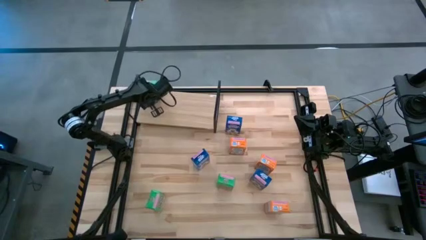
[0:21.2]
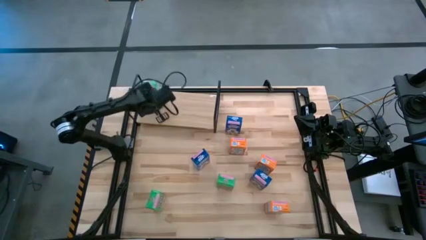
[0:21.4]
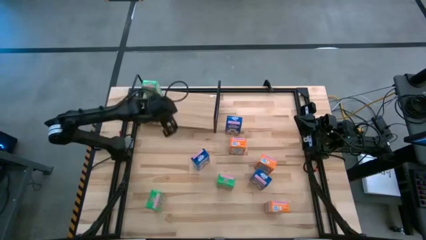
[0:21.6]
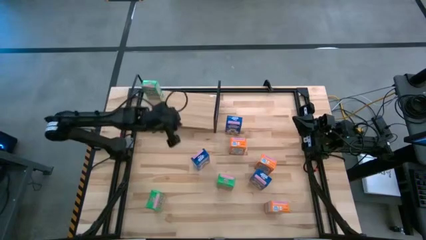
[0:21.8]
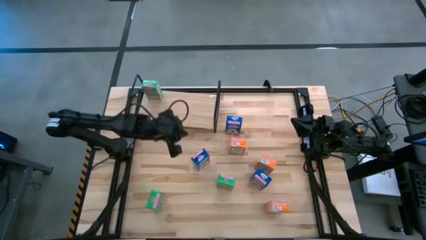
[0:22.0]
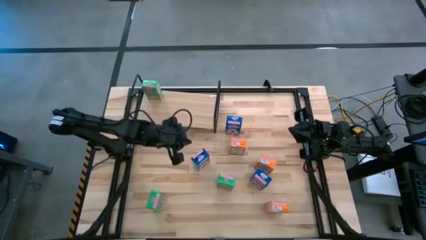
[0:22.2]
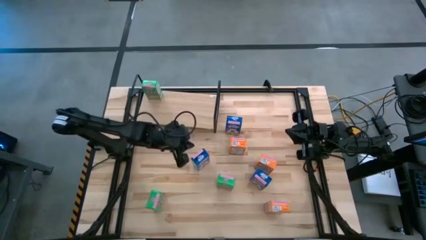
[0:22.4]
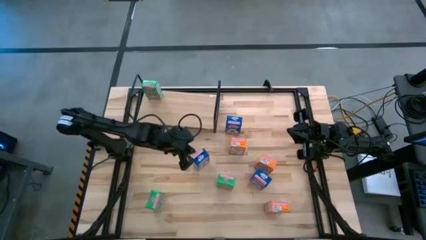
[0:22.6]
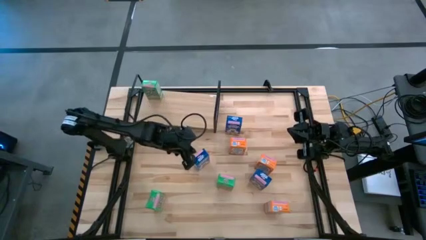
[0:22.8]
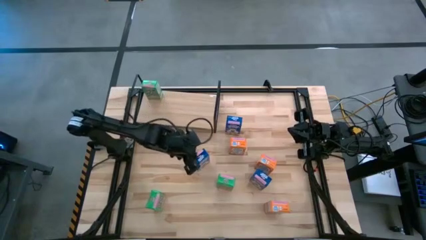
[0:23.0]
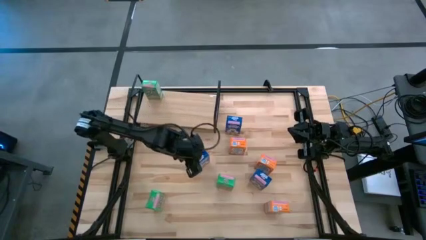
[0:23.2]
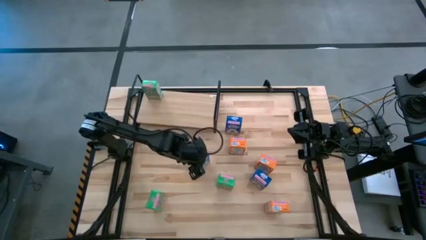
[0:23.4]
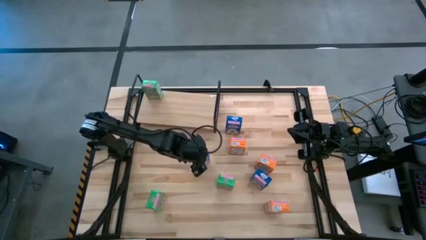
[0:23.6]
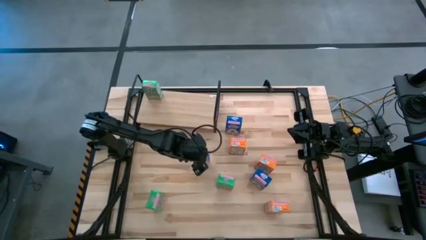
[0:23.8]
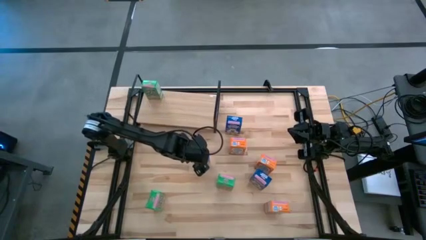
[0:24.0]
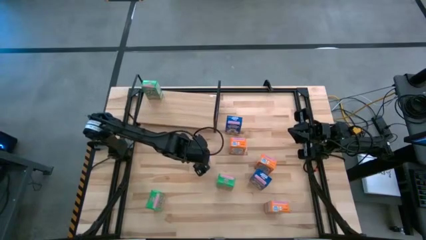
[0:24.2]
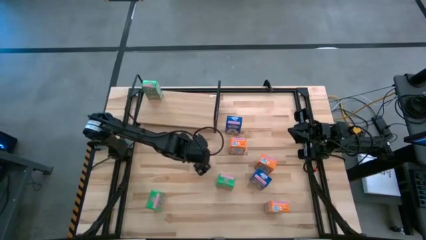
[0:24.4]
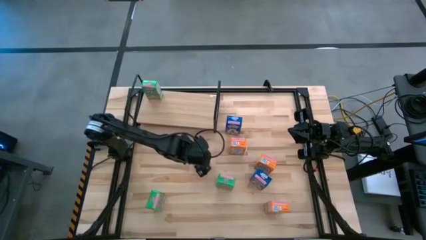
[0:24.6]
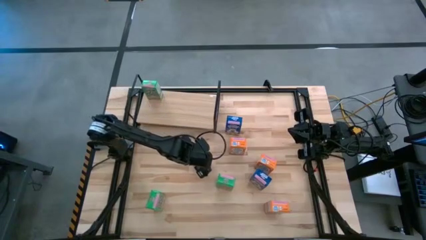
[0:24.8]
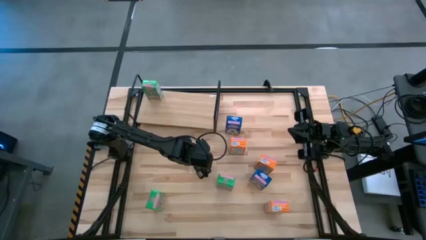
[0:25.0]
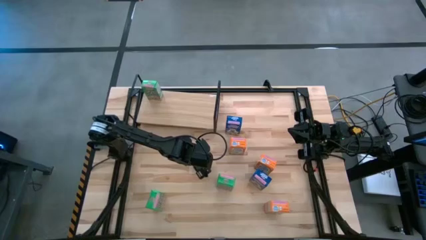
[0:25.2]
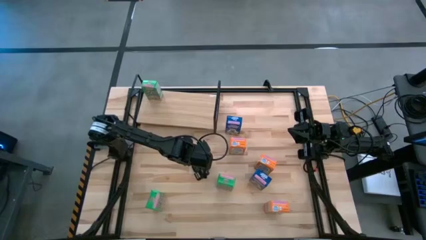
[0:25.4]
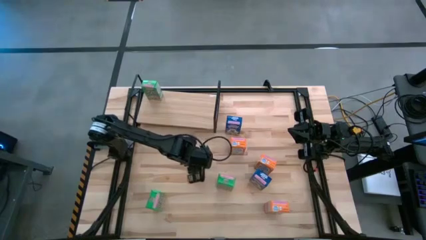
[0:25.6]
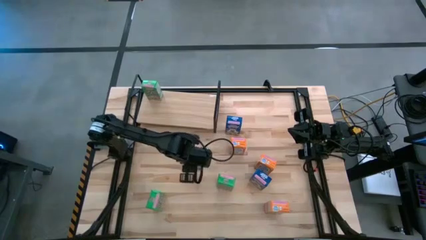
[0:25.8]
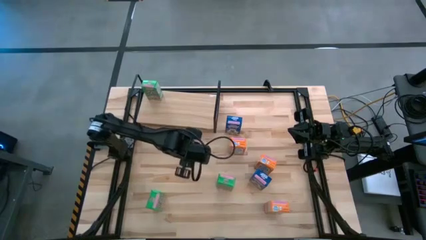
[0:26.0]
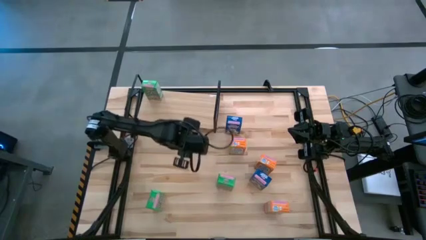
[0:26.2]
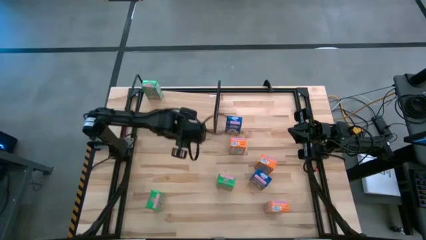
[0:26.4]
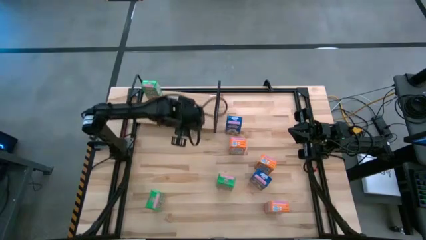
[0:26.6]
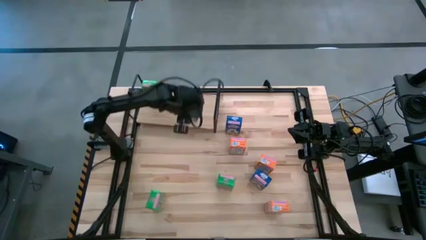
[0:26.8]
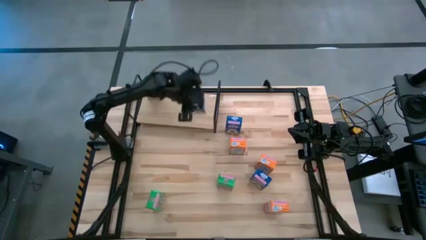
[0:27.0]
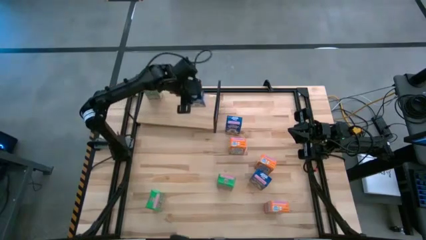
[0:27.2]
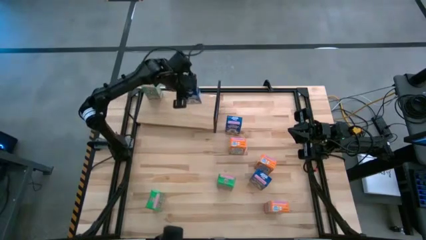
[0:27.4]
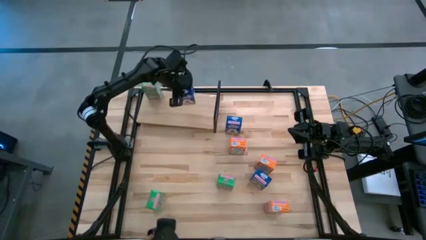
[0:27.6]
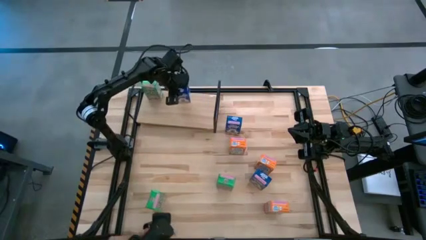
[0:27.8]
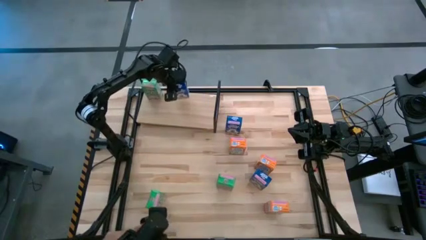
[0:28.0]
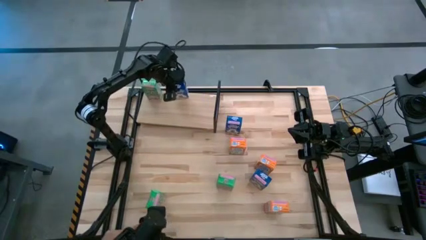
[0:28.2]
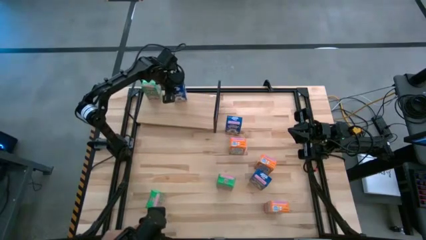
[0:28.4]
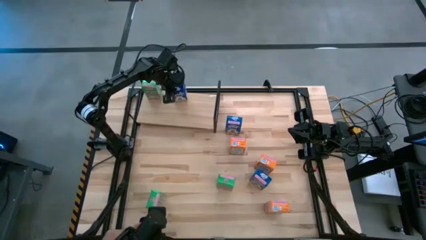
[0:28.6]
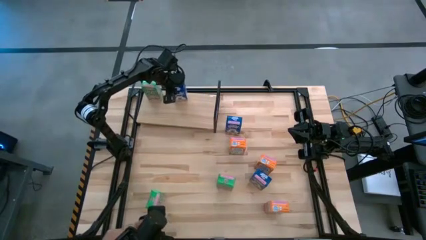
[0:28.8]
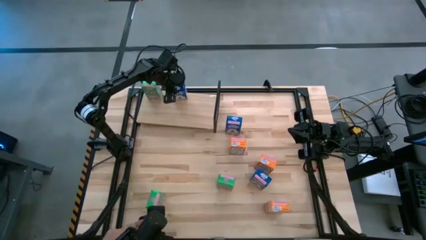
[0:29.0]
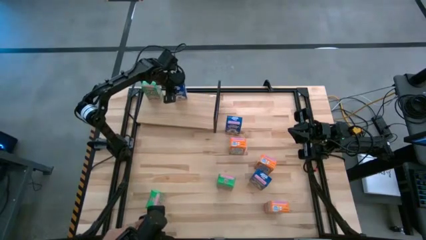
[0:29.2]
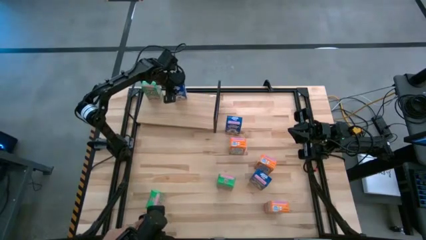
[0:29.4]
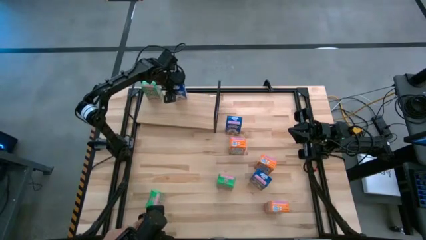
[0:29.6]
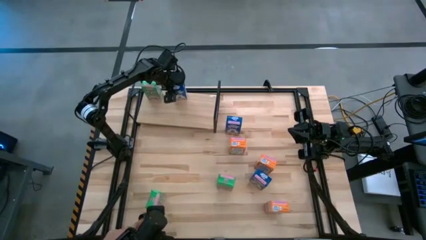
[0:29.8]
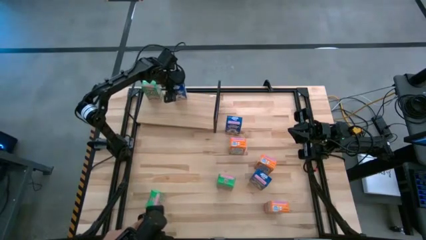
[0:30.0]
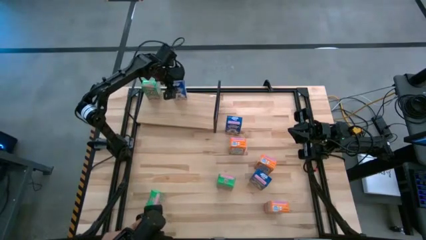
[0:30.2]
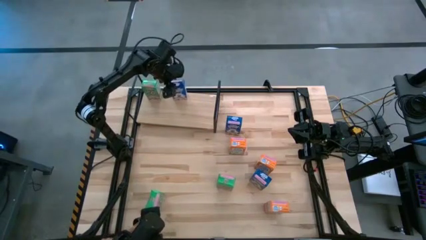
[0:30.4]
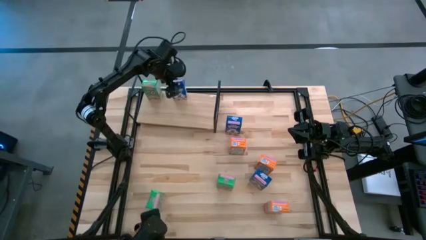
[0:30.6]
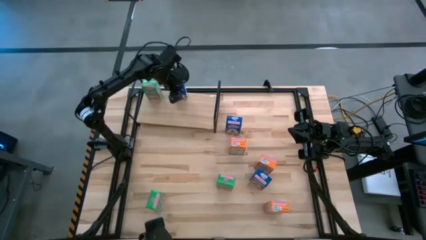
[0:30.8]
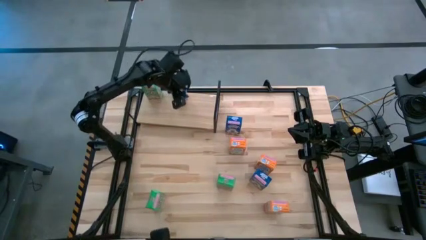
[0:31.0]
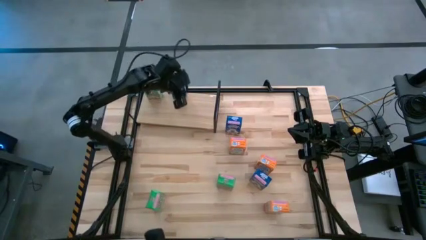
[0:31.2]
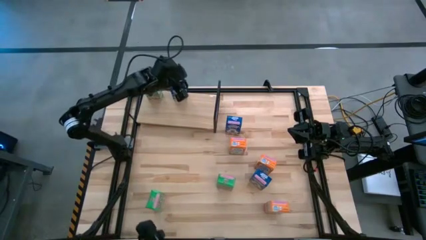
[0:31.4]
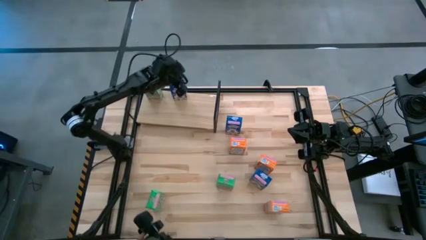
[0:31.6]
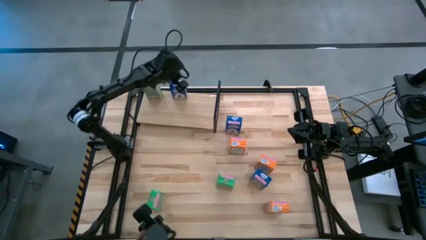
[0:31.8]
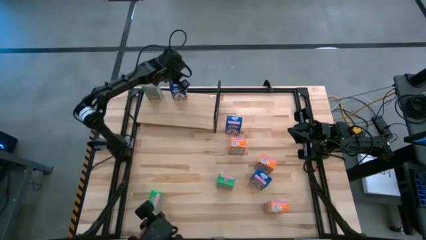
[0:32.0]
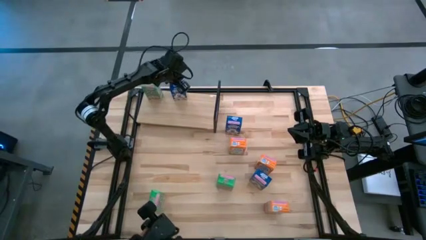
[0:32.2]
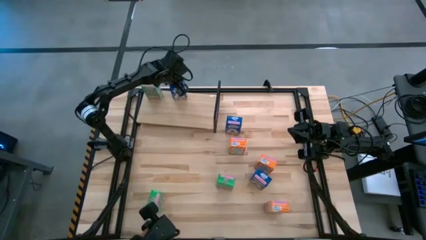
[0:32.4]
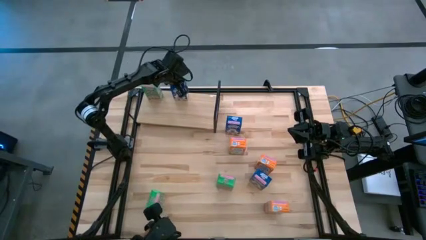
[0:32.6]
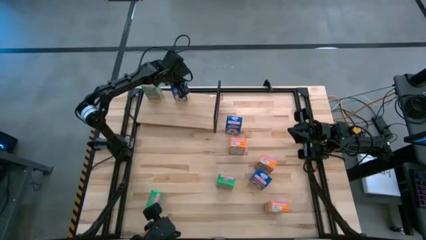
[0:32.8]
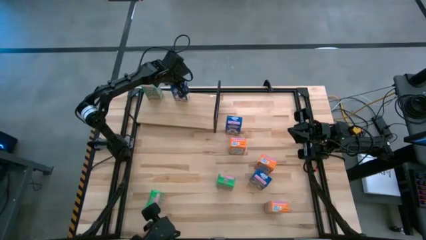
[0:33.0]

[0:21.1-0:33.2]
Task: Stack cereal on shelf
Put the bottom left blue cereal box on the shelf
